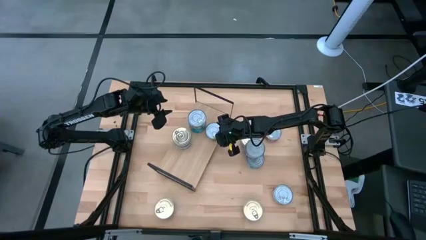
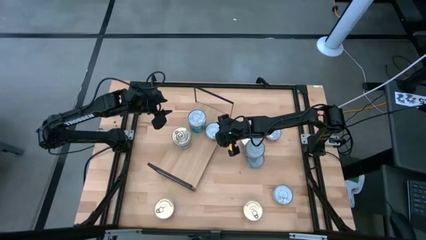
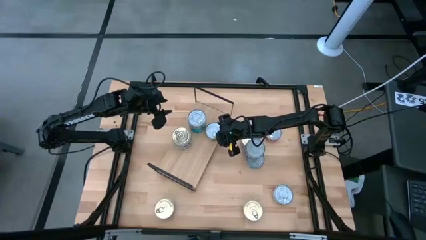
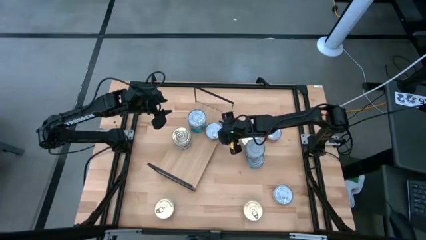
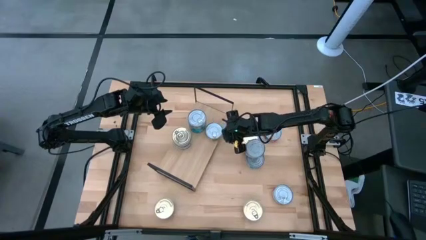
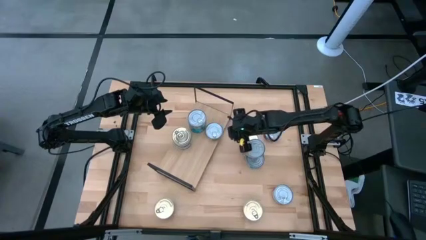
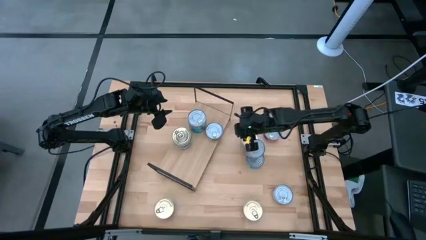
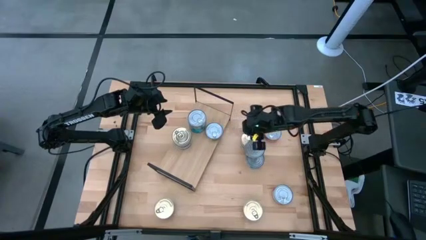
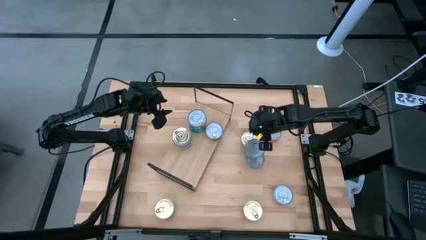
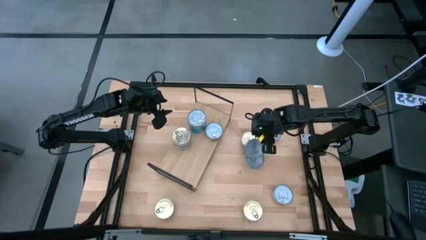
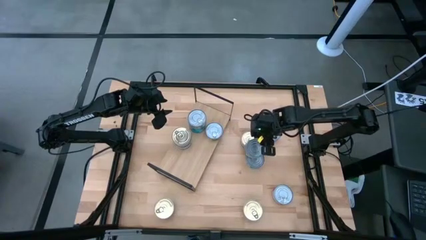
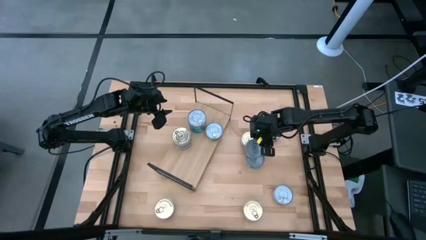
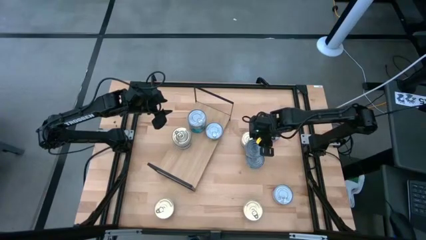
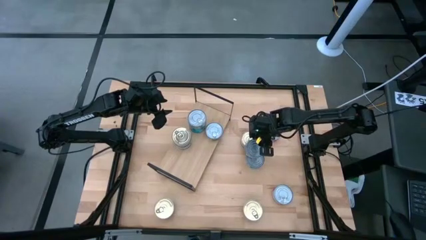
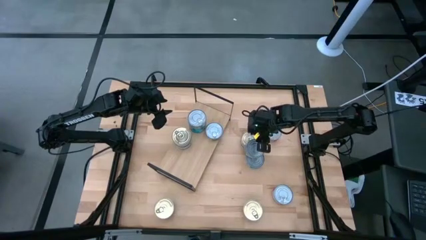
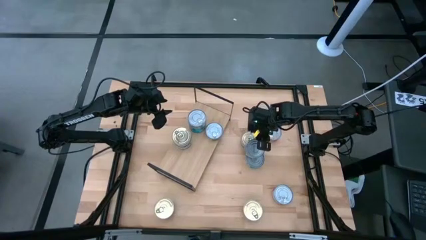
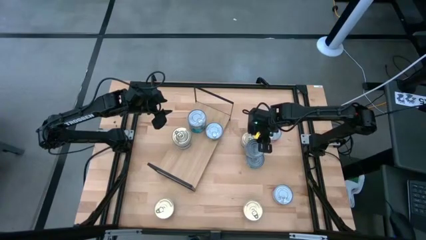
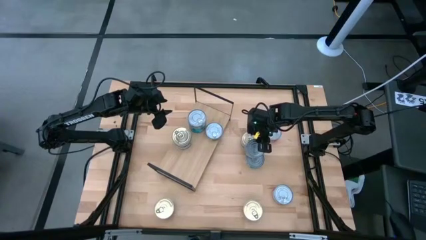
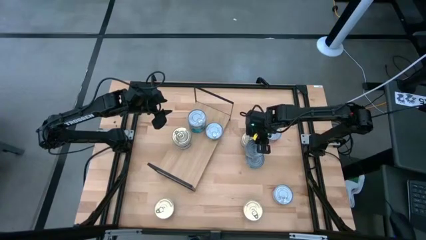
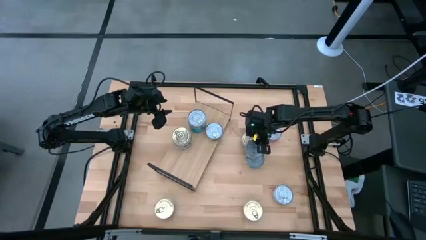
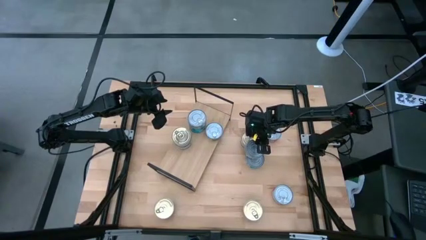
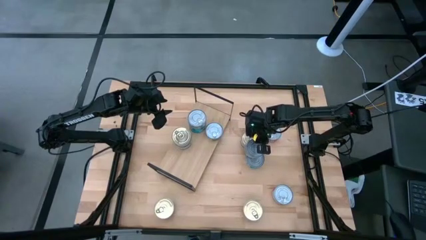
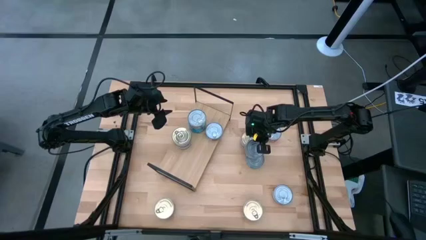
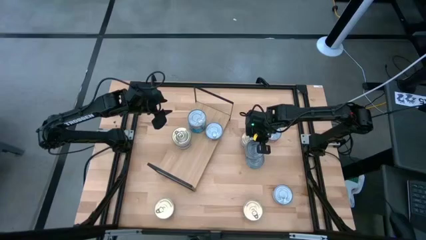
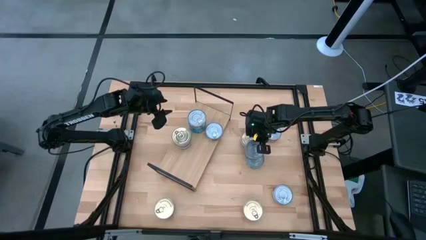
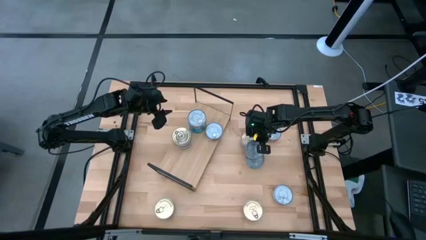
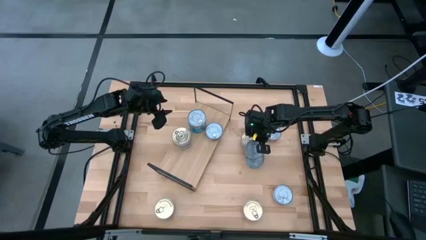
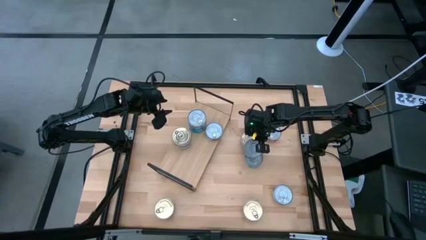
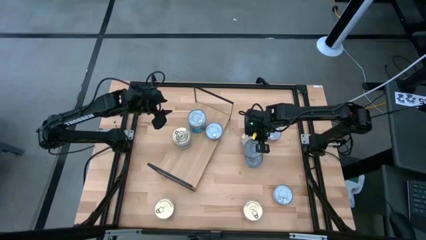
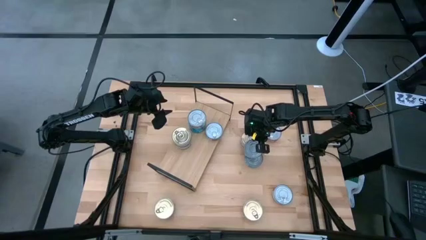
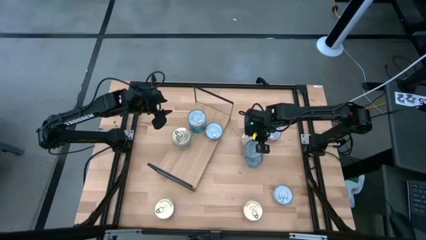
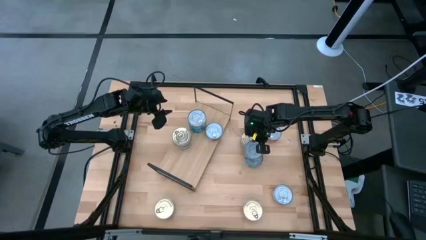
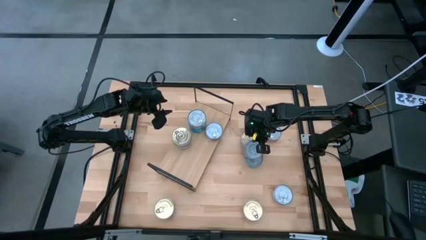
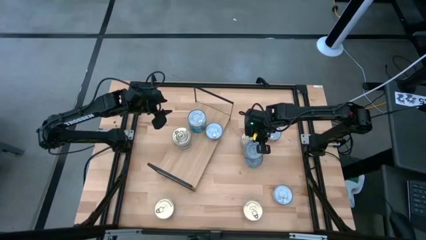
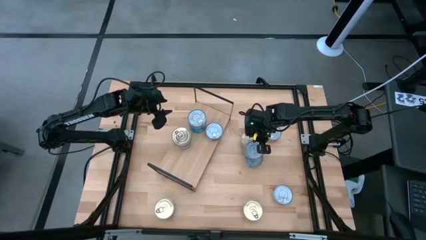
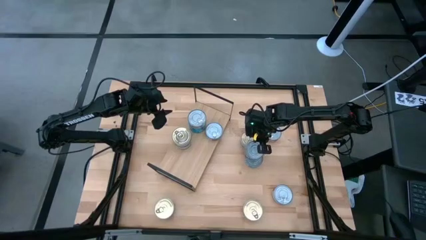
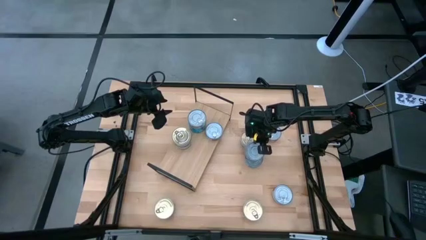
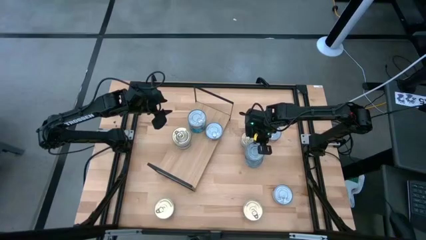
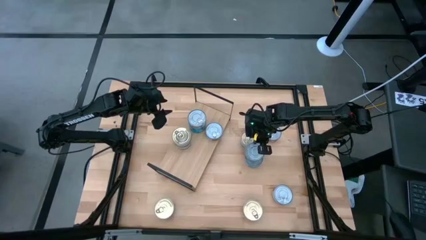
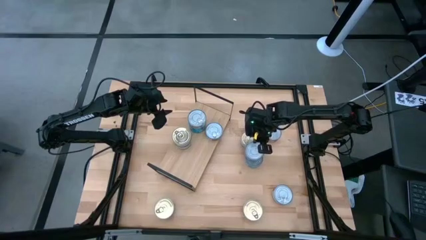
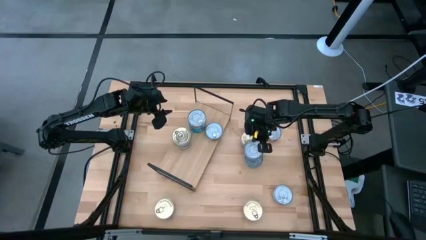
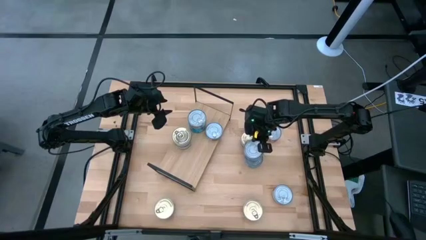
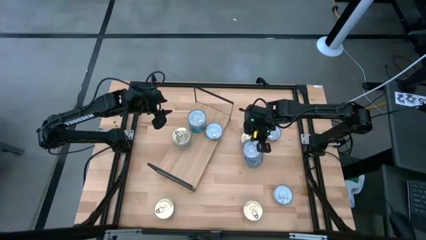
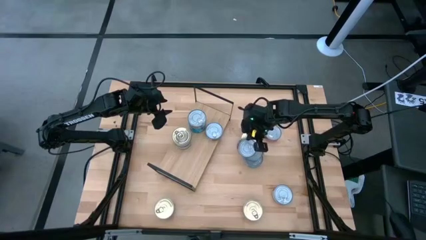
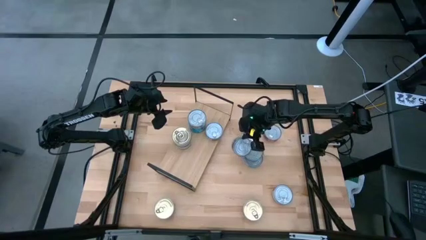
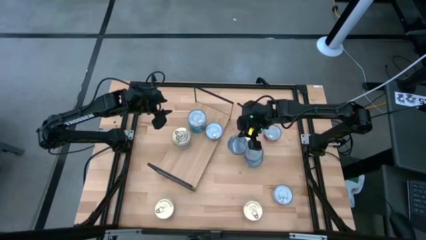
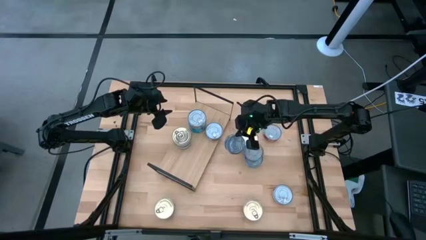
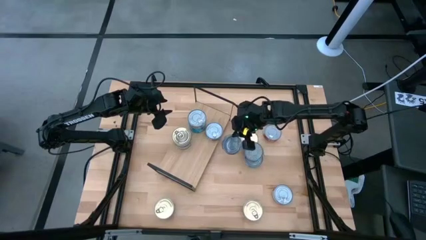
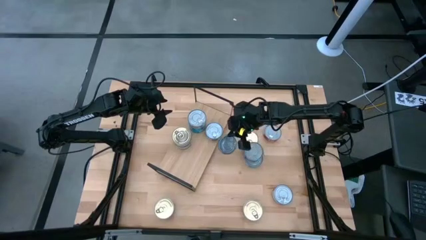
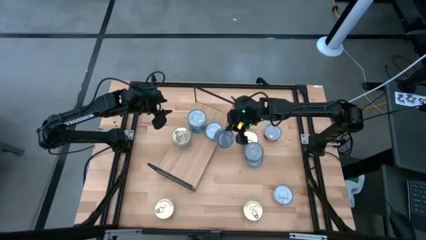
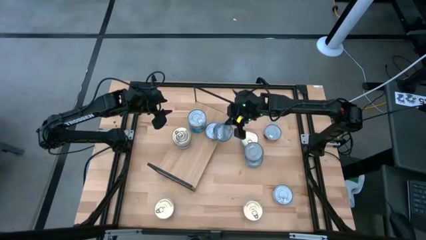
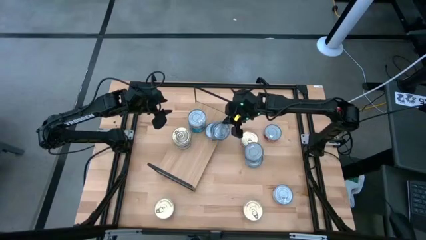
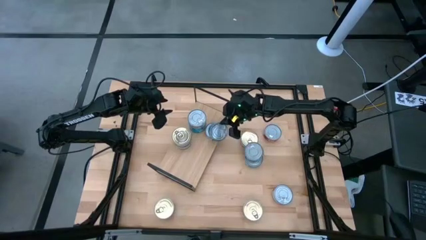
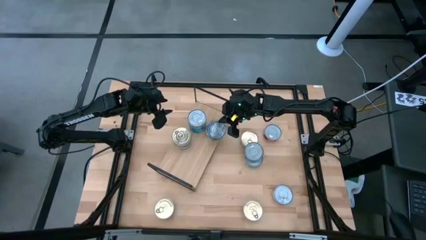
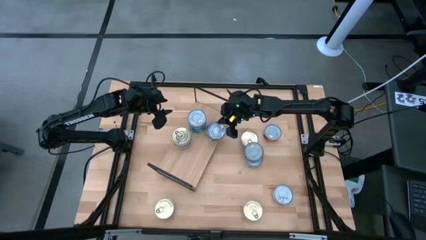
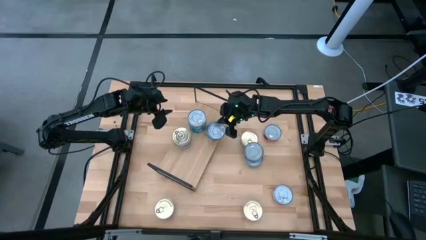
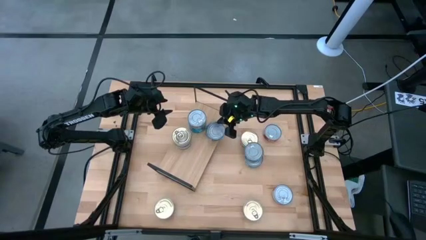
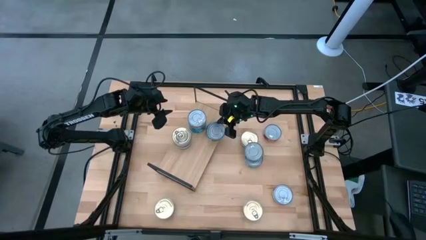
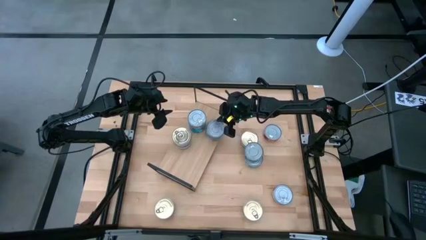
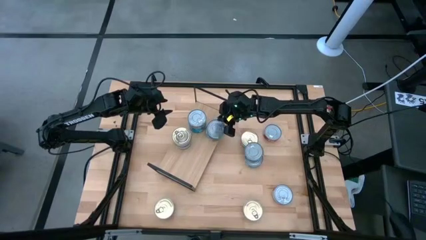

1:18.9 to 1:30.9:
Task: Stack canned seafood by type on shelf
Stack the green tuna can on top of the green tuna can on the shelf

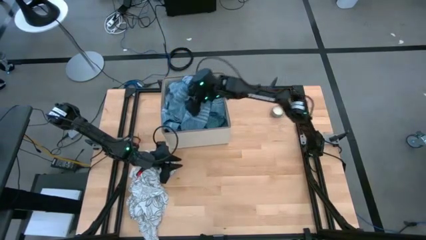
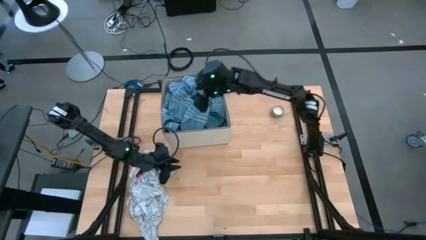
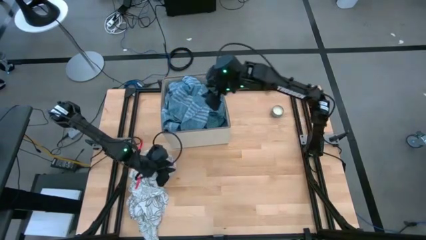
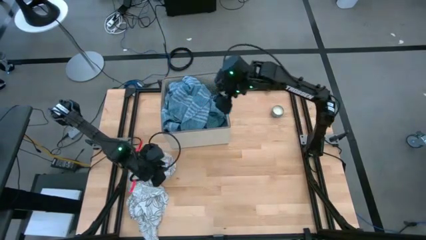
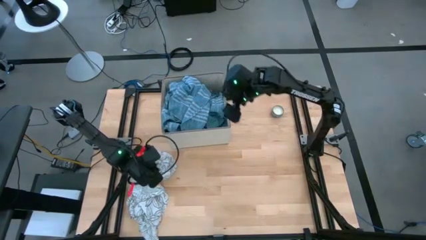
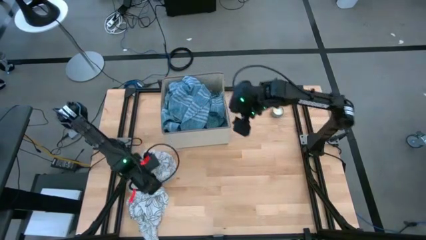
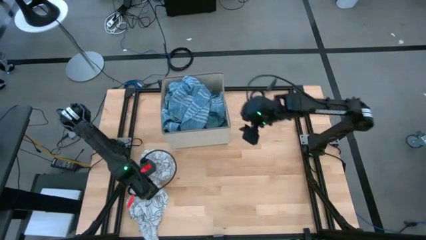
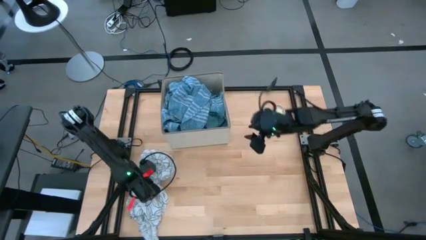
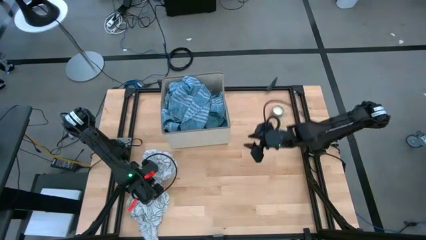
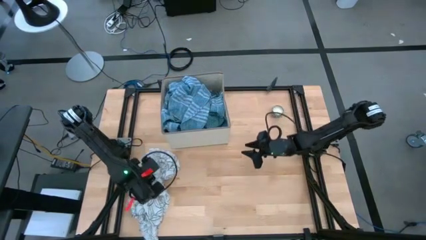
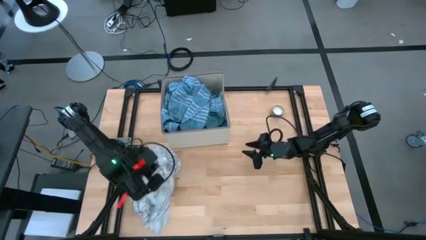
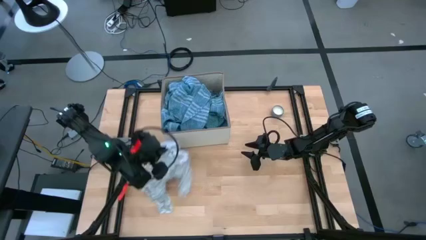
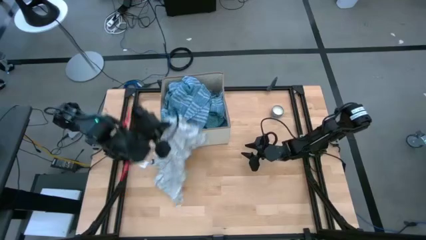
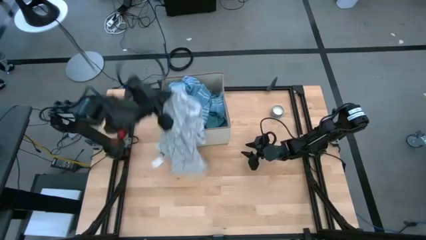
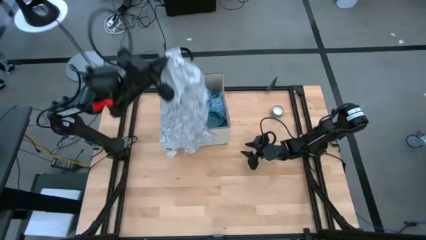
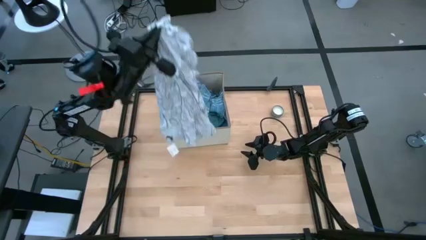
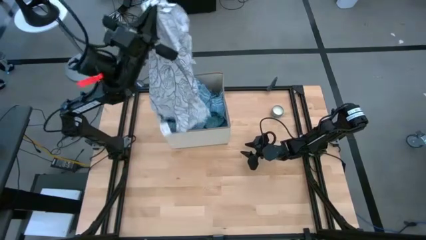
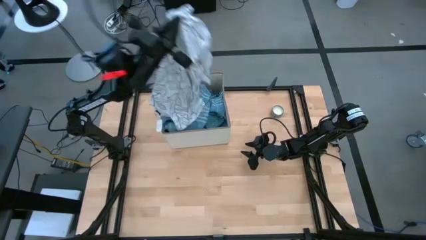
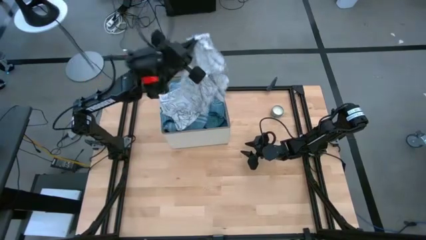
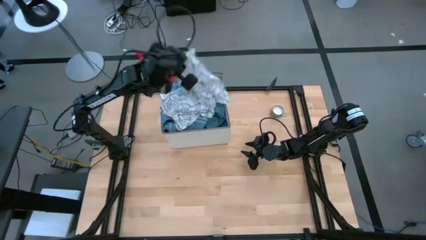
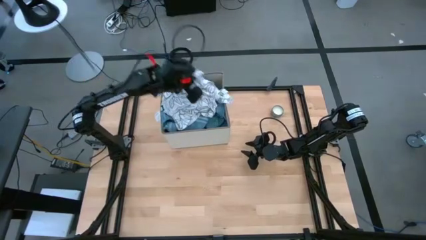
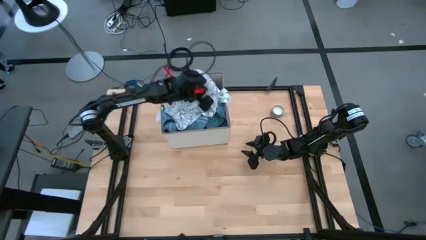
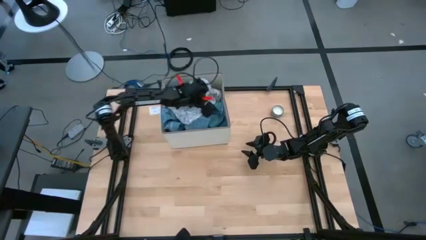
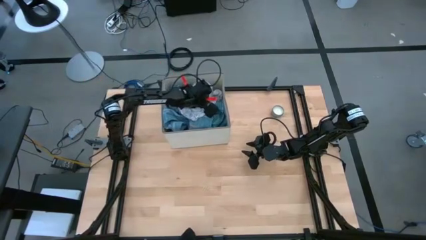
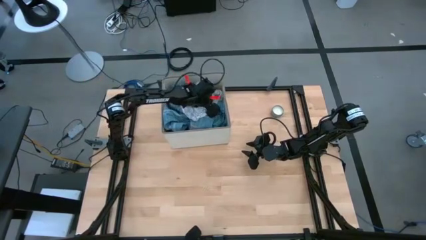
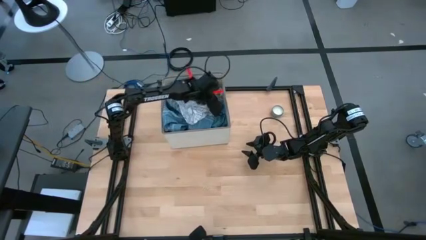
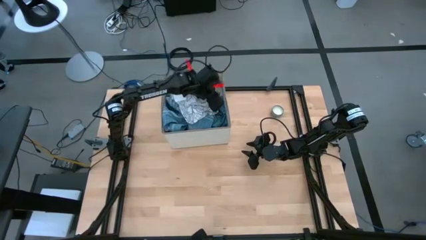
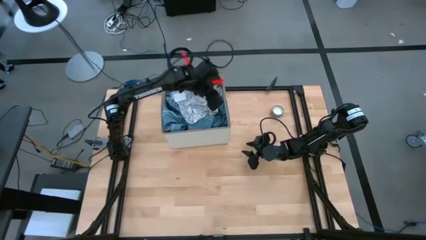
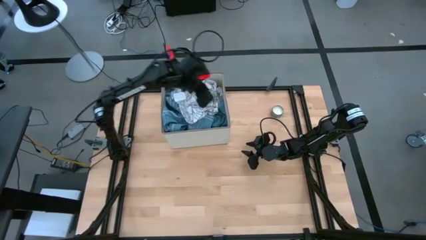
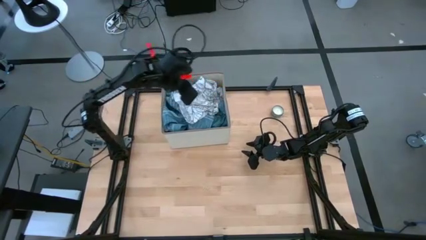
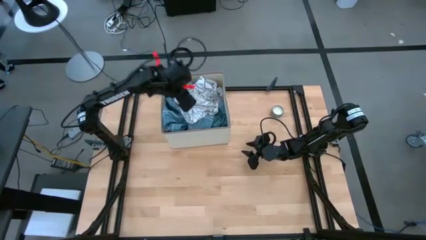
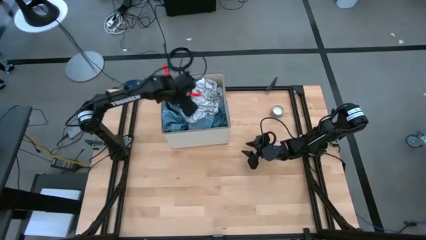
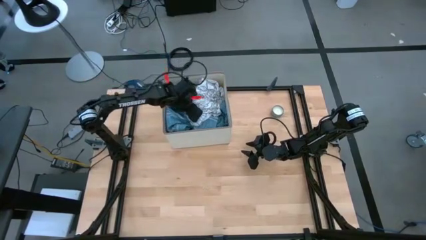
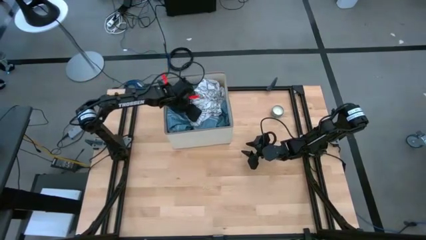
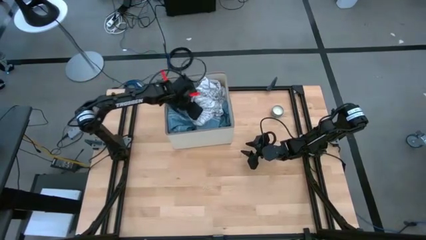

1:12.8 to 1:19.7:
Task: Sort clothes
Put the white polo shirt into the white laundry organizer
